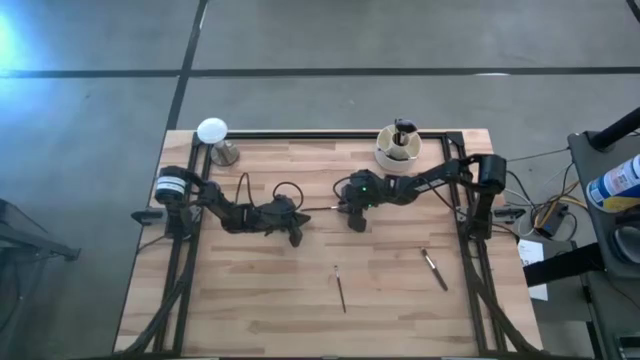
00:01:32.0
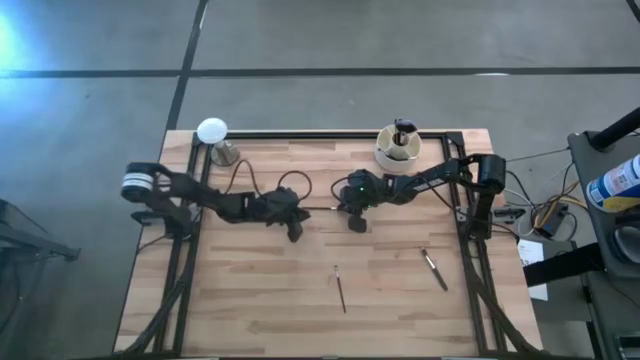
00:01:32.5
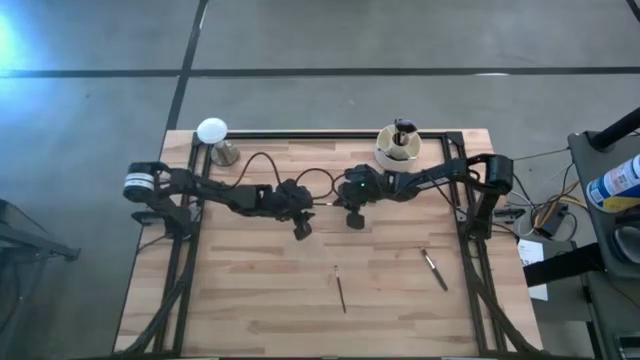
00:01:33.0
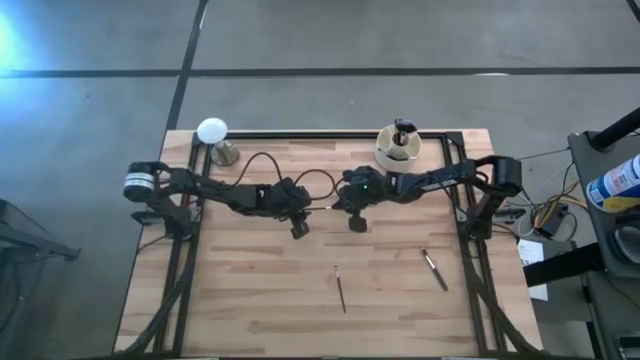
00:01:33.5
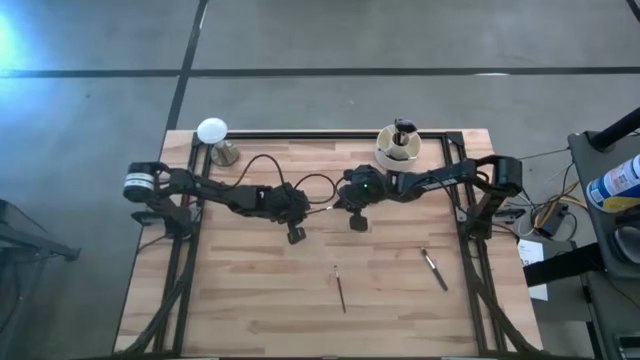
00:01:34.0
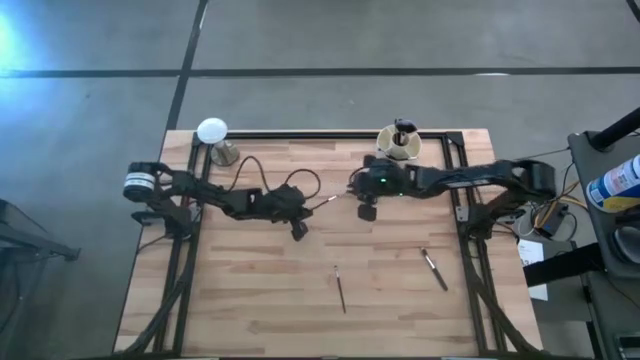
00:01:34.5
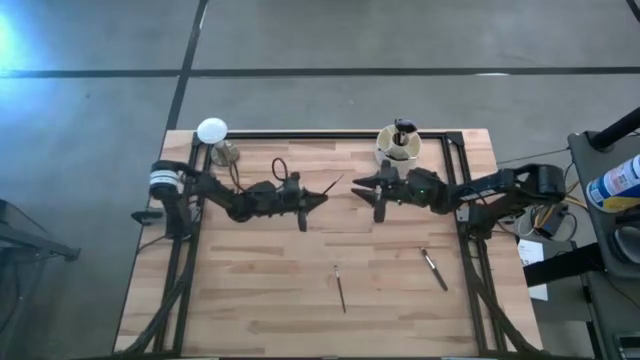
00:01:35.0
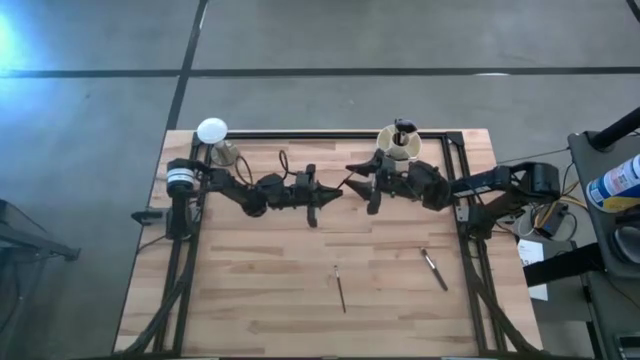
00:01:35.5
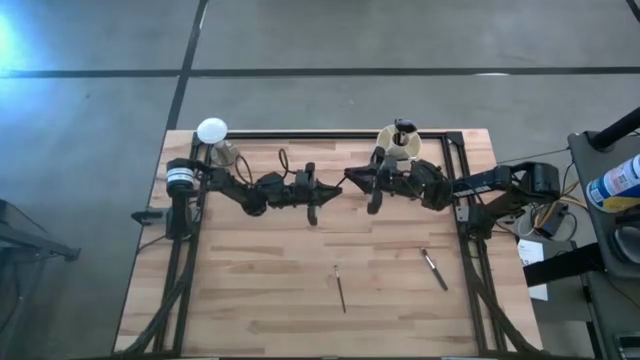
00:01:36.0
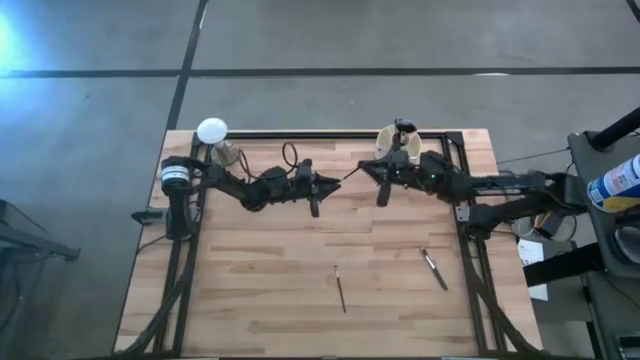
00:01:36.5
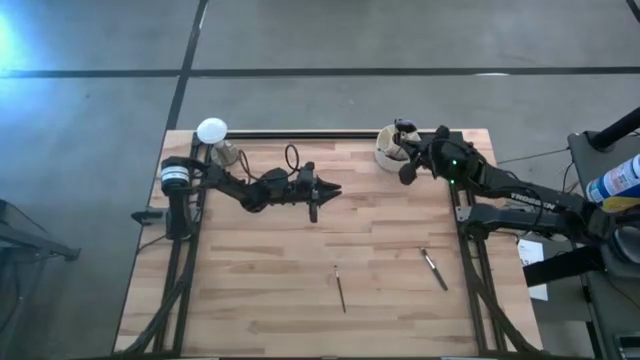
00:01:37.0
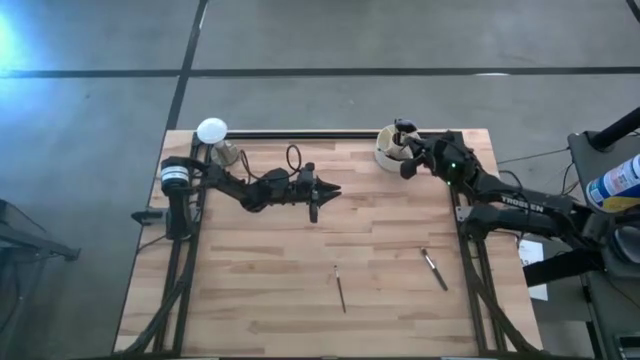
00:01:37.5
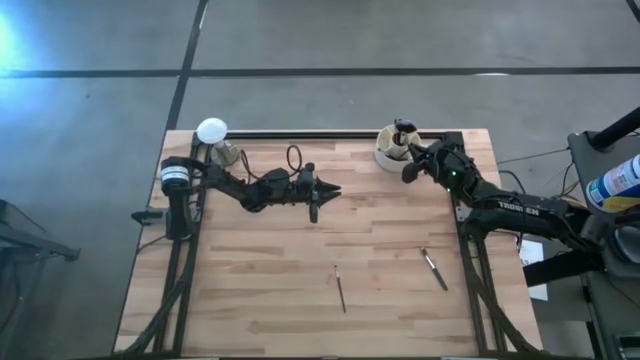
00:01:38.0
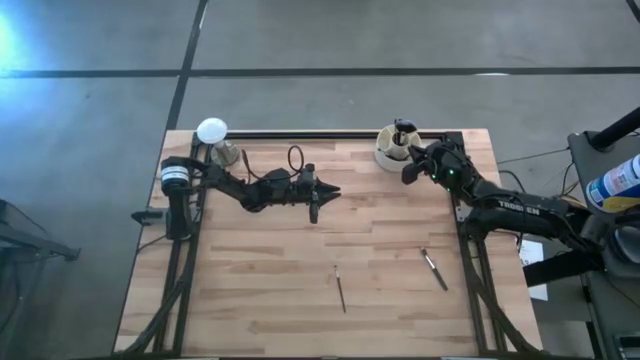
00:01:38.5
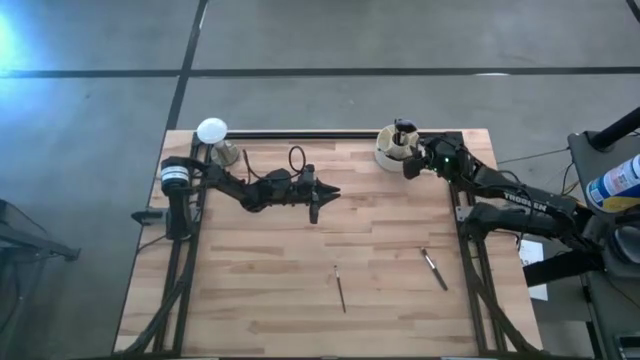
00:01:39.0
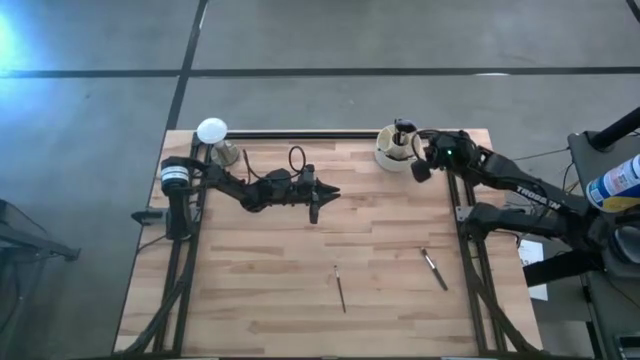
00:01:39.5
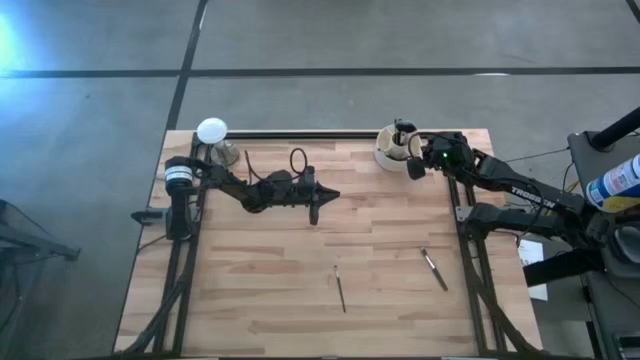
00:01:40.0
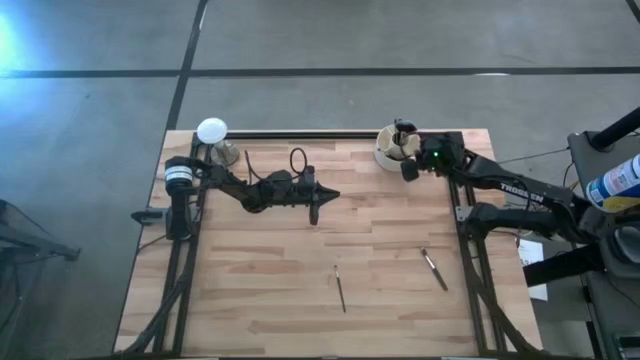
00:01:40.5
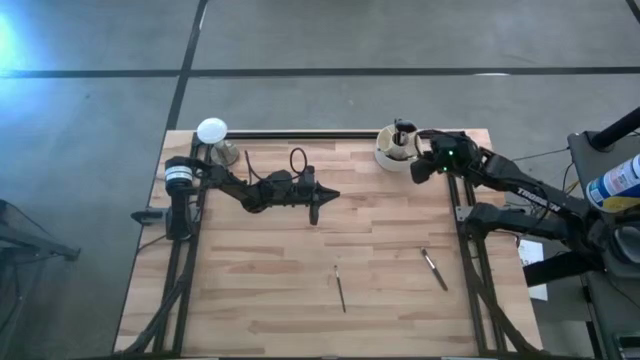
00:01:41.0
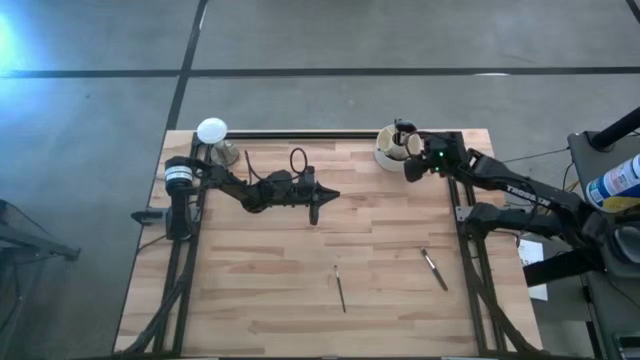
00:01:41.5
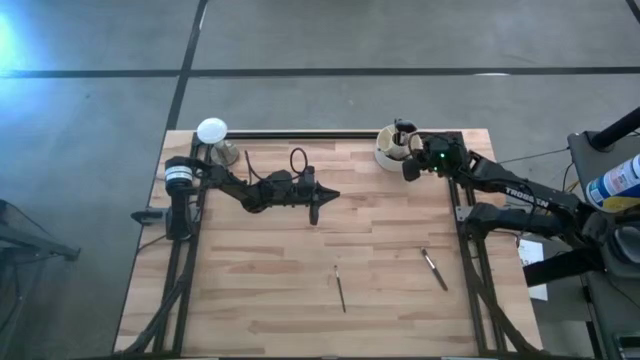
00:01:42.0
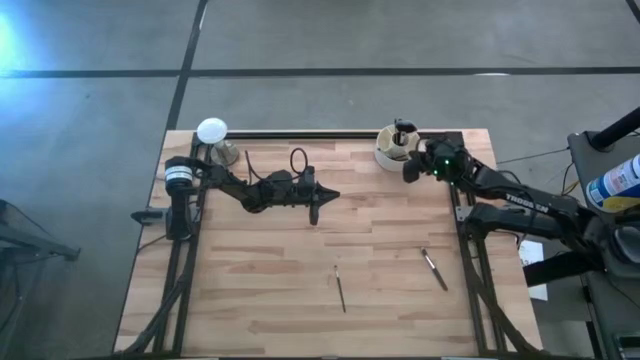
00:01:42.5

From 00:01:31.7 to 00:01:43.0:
Task: Put items in baskets/containers
Put the black eyeshadow brush into the white pen organizer

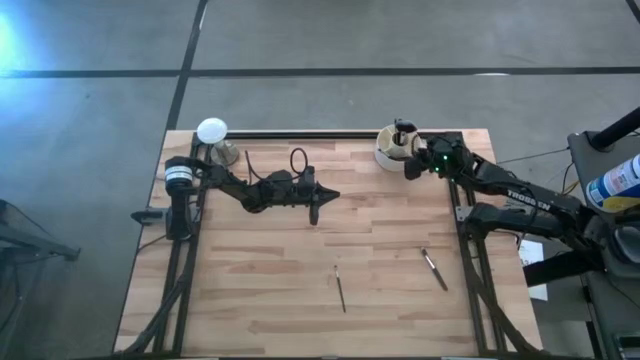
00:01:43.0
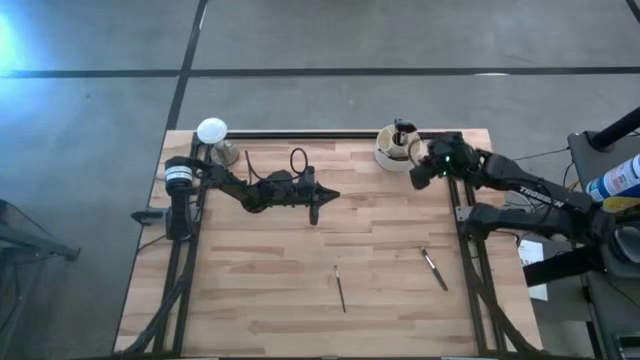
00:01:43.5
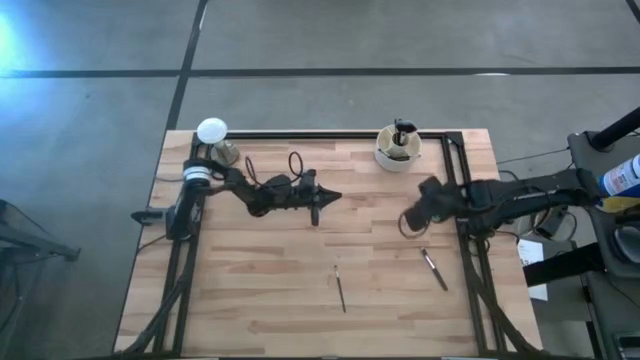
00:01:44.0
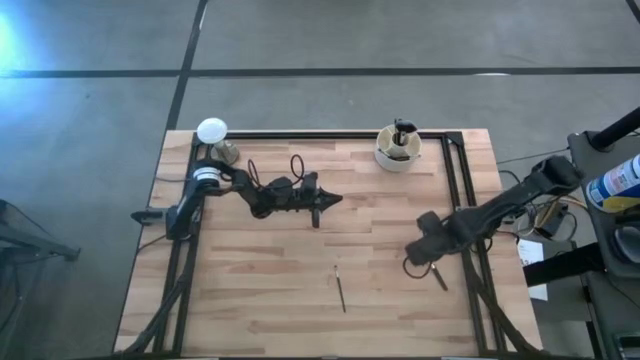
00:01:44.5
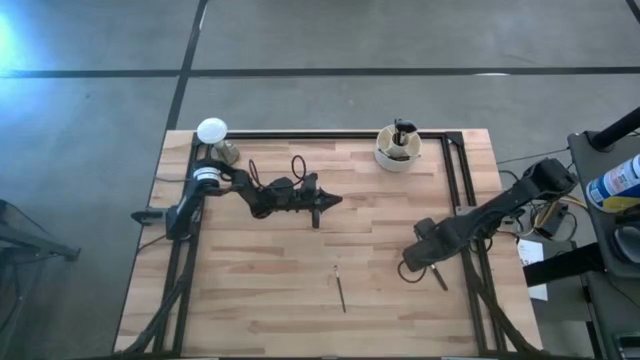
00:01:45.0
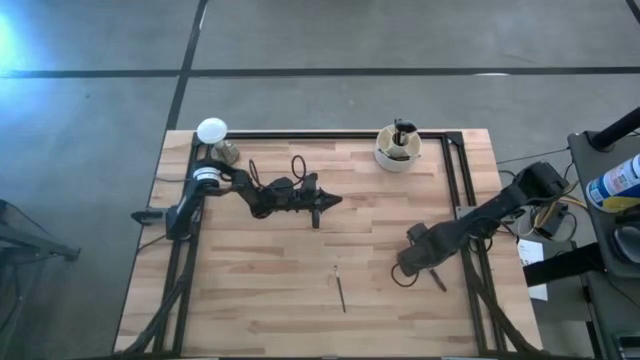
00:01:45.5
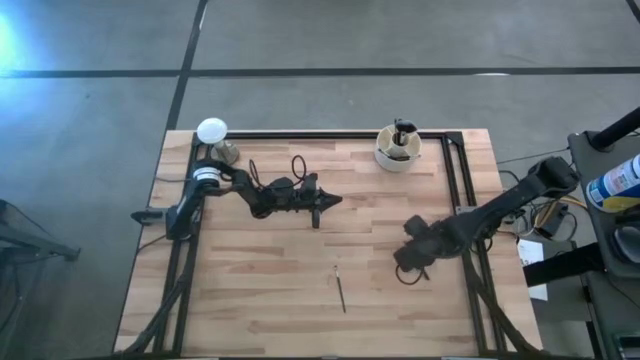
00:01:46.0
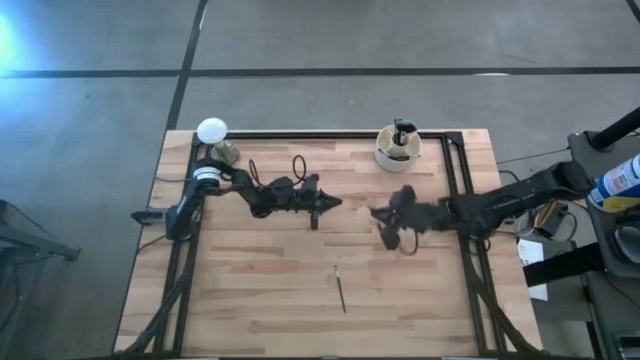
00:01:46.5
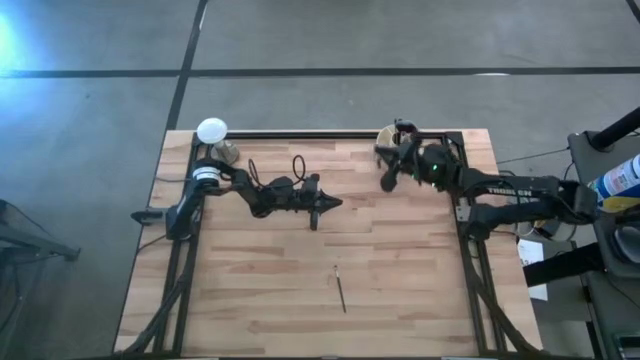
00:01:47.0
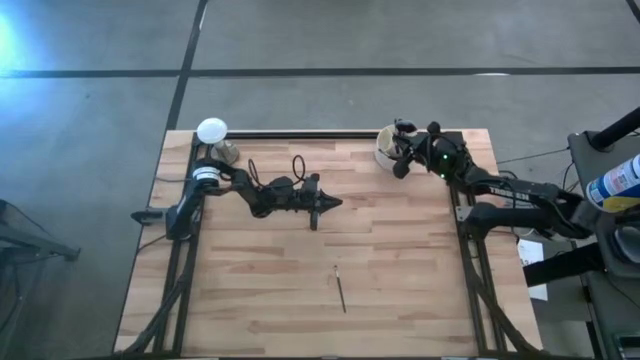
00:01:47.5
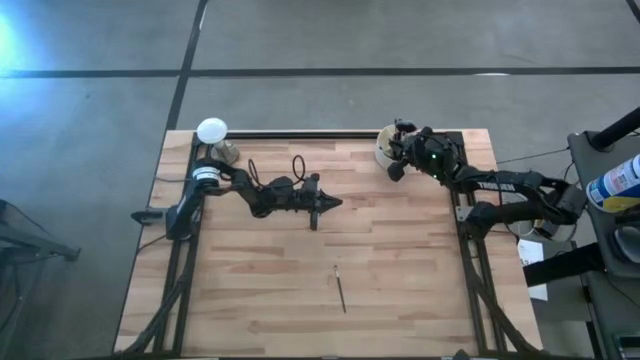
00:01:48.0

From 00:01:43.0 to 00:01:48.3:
Put the black blush brush into the white pen organizer

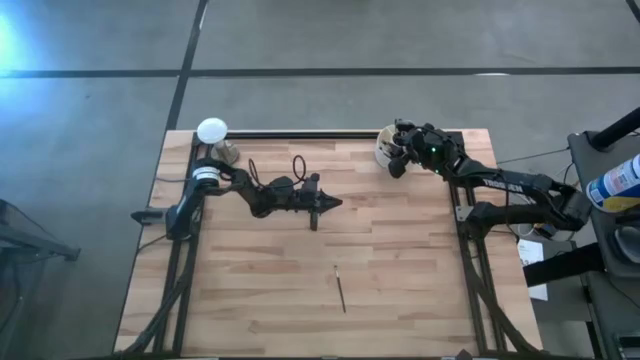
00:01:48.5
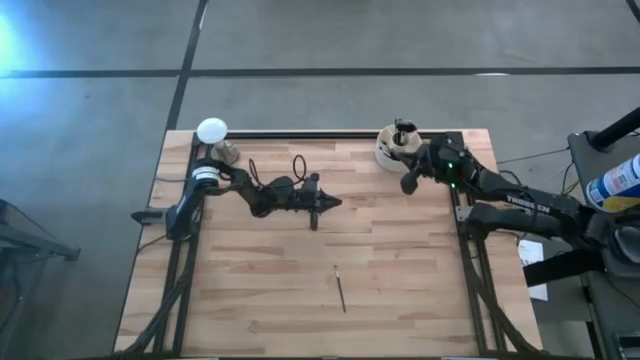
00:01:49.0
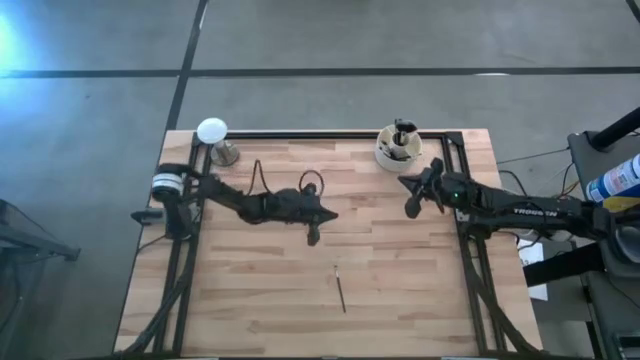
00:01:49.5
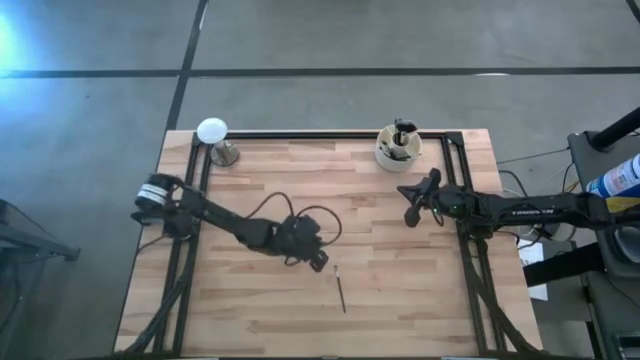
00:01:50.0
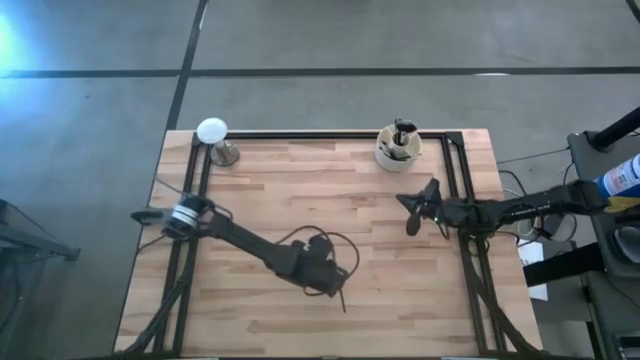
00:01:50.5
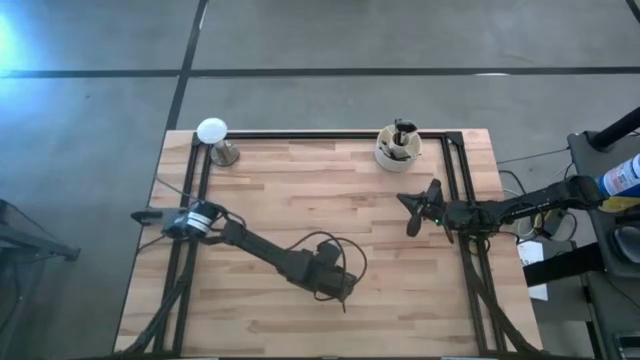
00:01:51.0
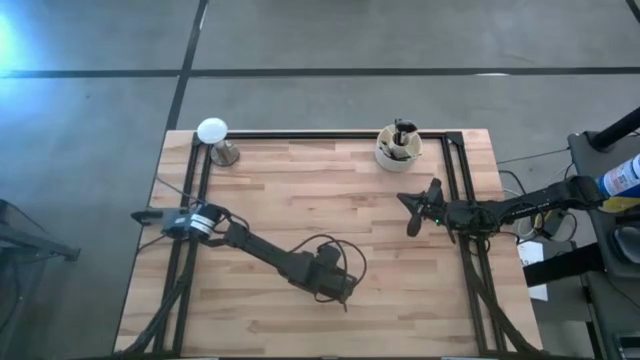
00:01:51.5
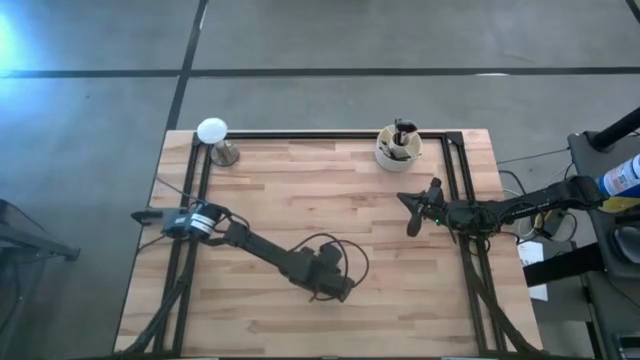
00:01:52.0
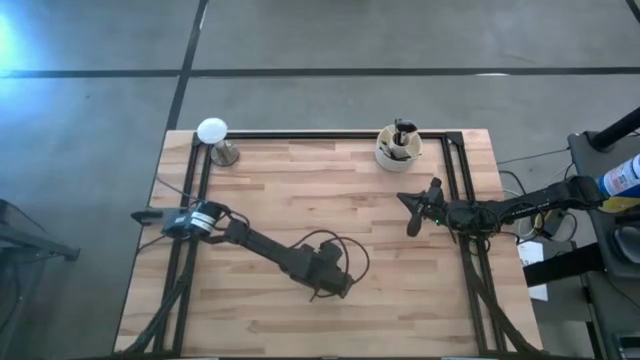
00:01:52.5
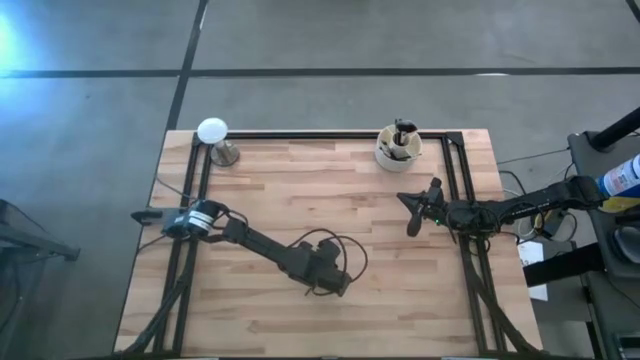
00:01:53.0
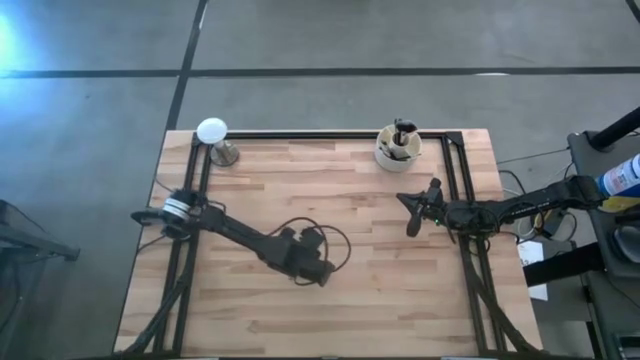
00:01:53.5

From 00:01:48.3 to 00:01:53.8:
Put the black eyeshadow brush into the white pen organizer
